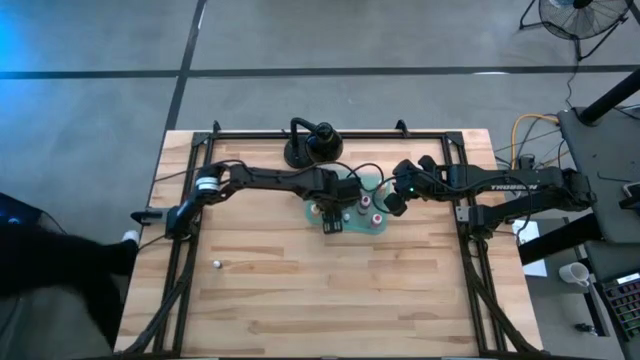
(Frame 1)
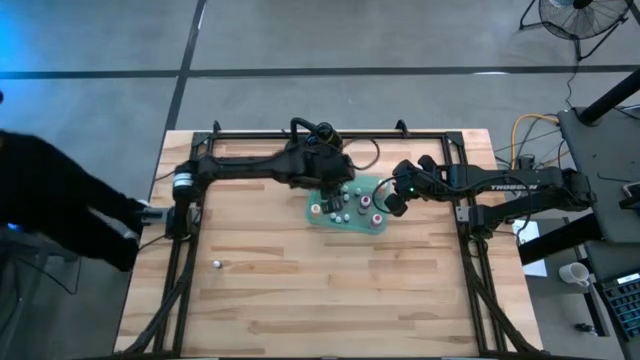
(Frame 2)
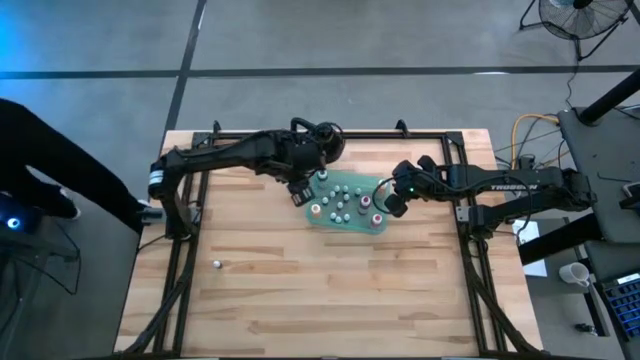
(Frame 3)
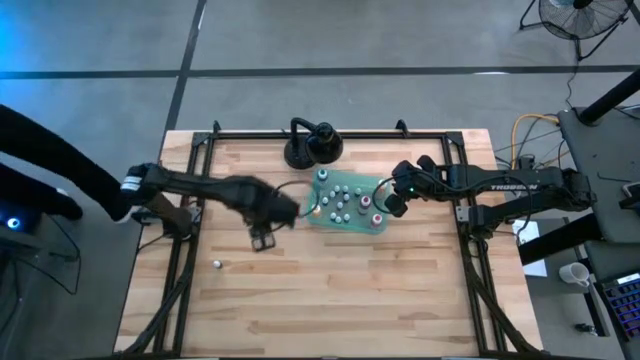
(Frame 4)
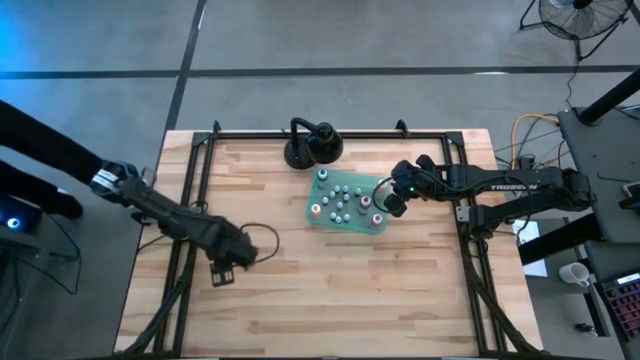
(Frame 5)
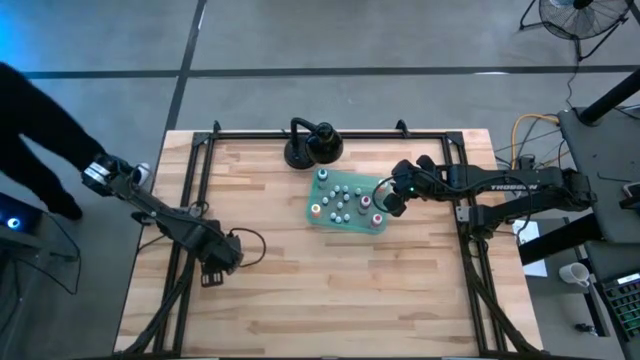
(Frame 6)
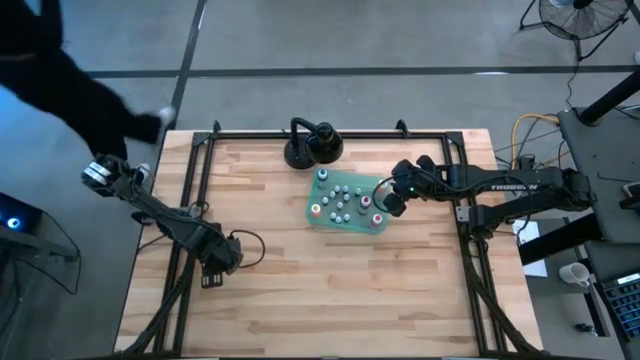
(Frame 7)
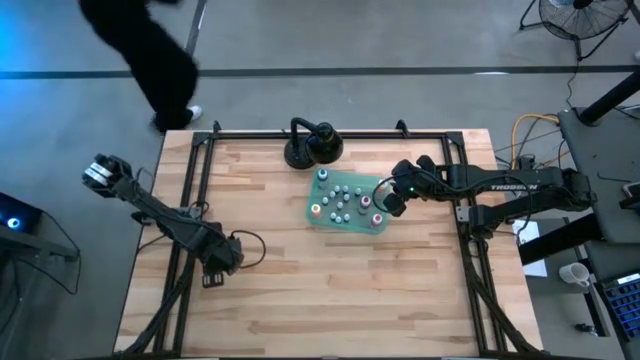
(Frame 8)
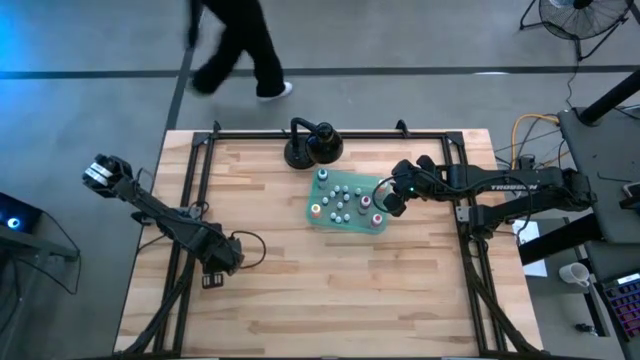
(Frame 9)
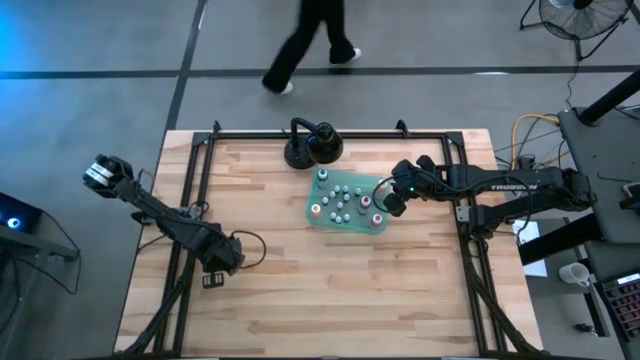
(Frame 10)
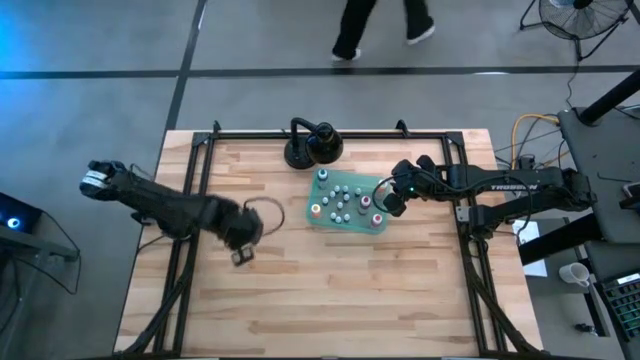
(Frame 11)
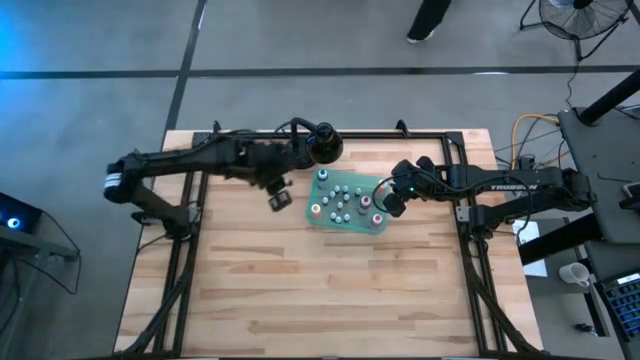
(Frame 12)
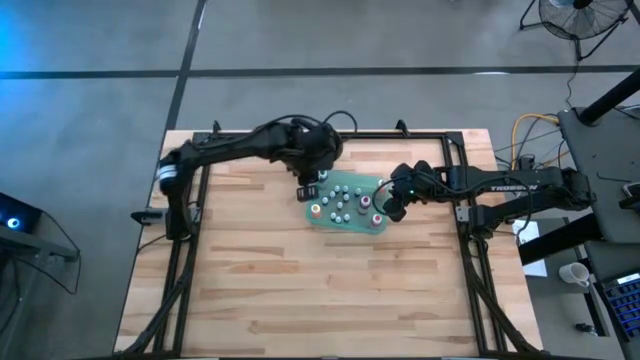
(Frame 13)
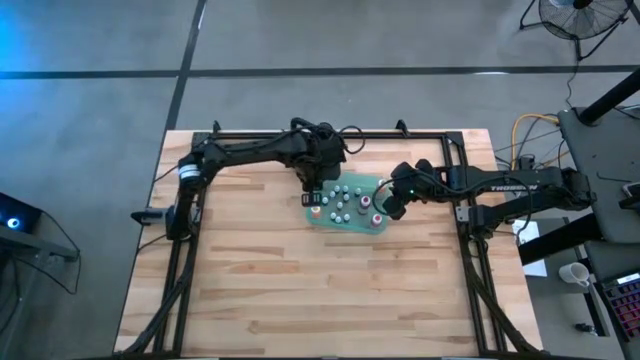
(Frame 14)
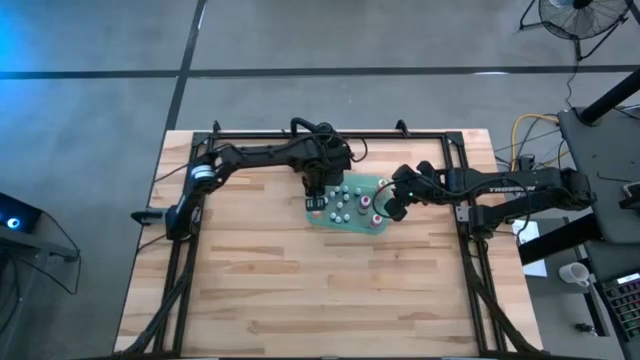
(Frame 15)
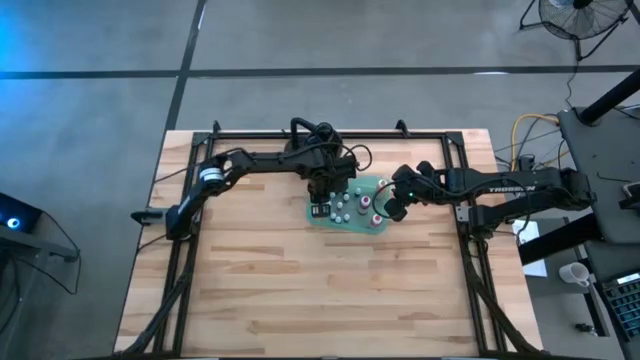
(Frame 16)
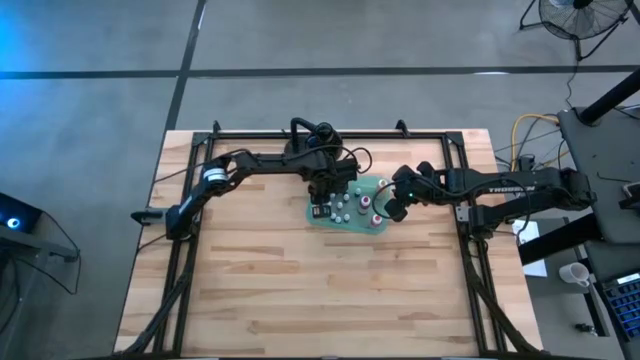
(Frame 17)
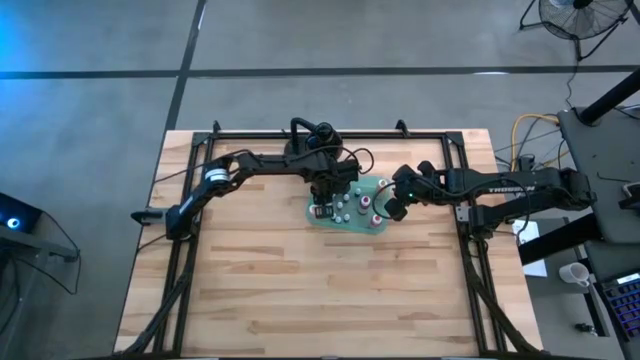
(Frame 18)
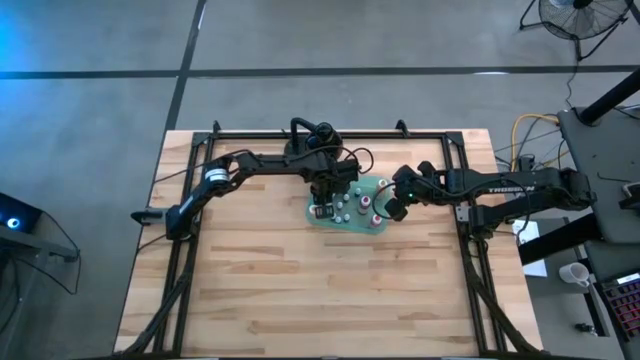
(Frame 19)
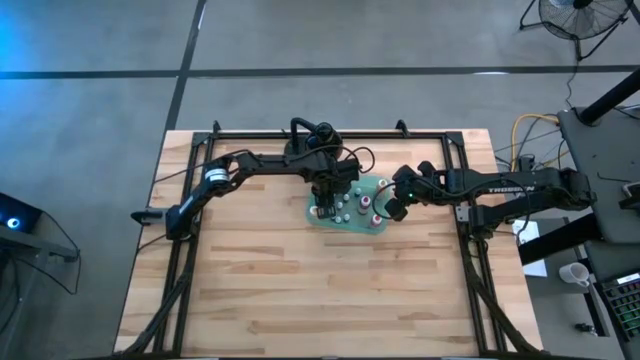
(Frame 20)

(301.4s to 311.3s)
Task: Pick & Place food coloring
Put the green food coloring bottle into the bin

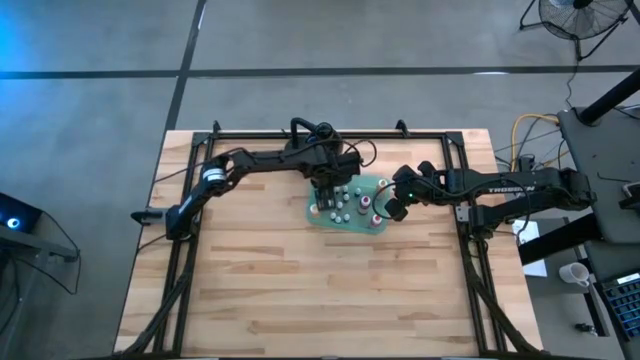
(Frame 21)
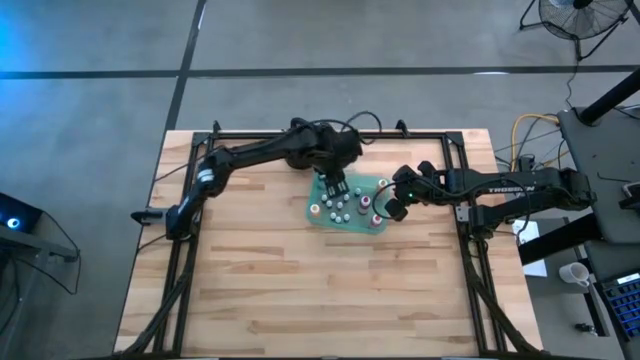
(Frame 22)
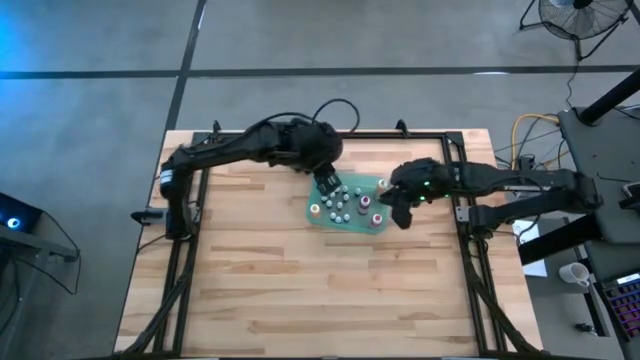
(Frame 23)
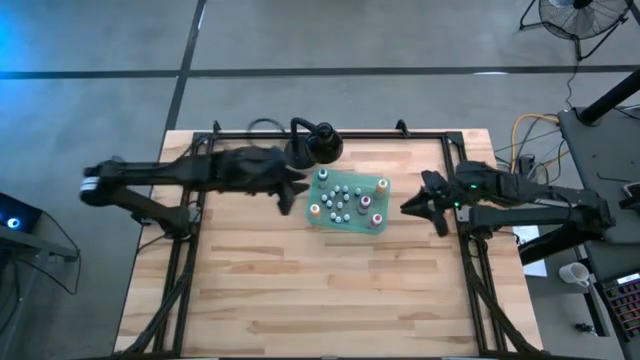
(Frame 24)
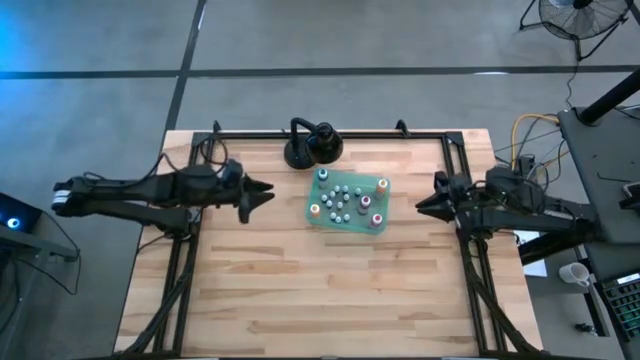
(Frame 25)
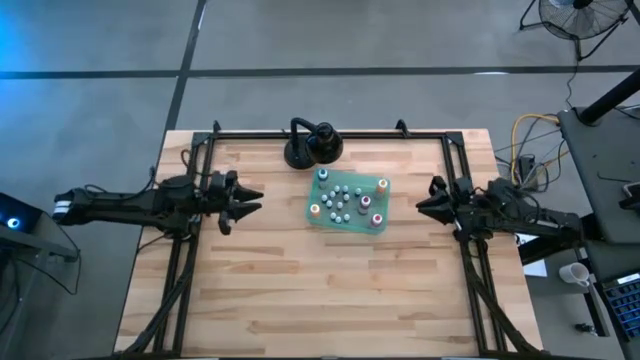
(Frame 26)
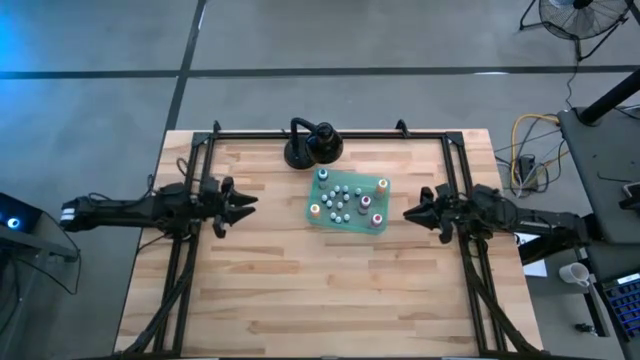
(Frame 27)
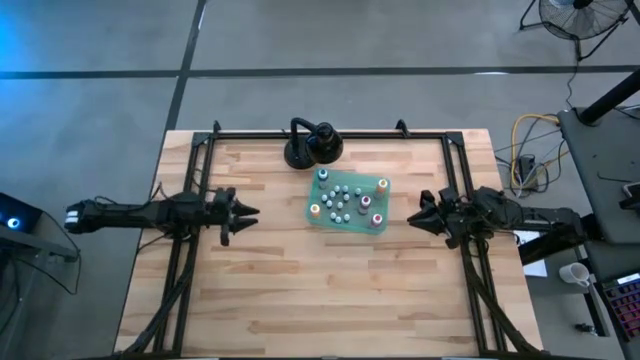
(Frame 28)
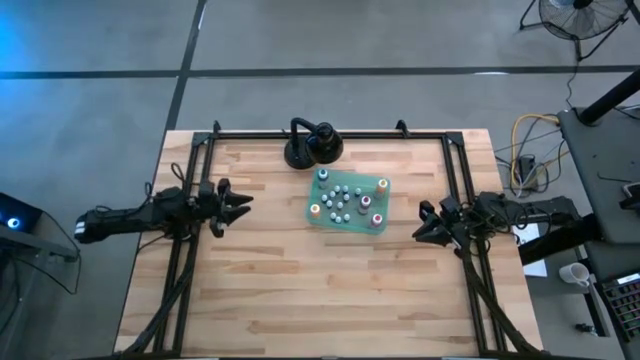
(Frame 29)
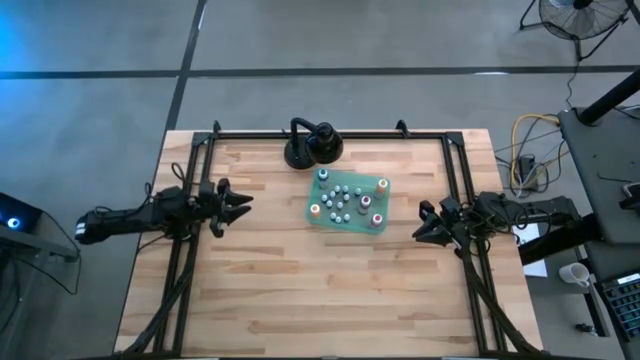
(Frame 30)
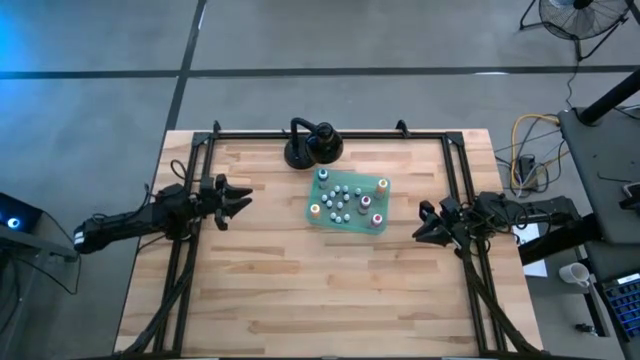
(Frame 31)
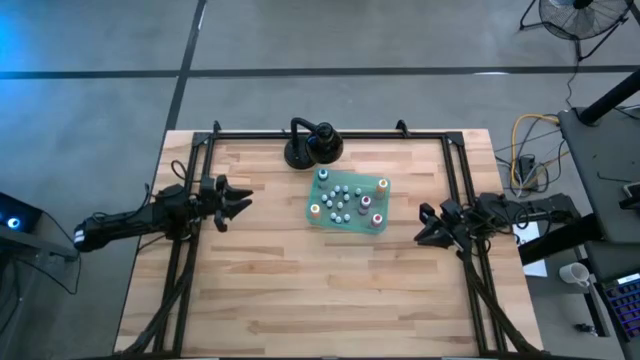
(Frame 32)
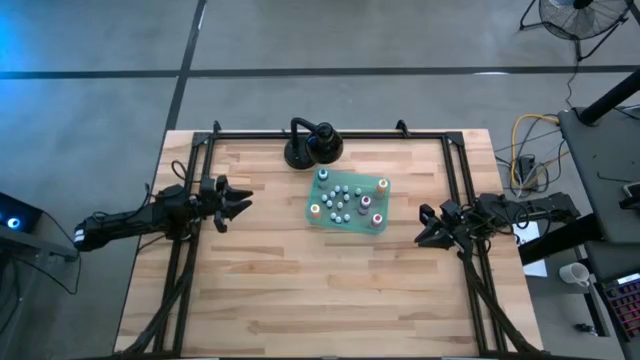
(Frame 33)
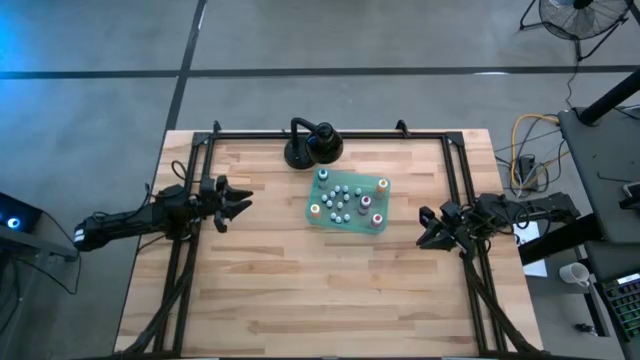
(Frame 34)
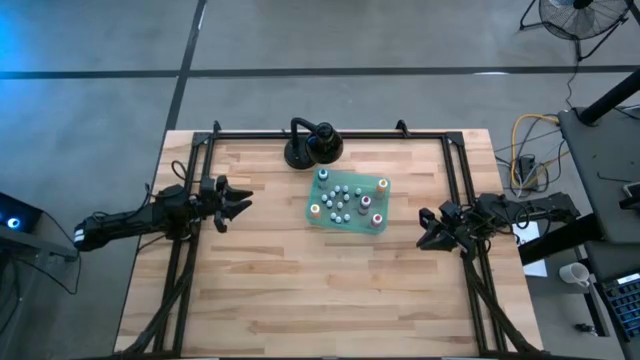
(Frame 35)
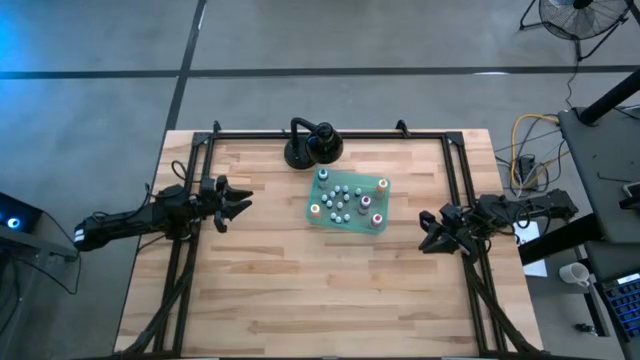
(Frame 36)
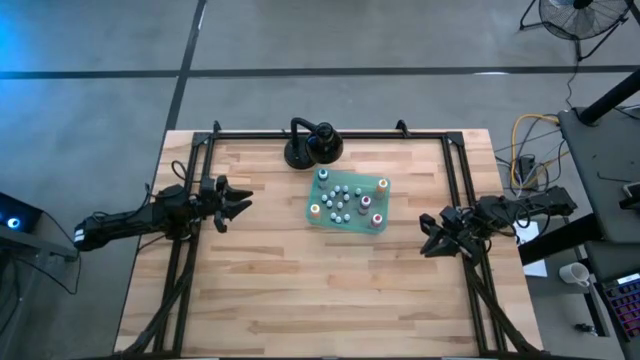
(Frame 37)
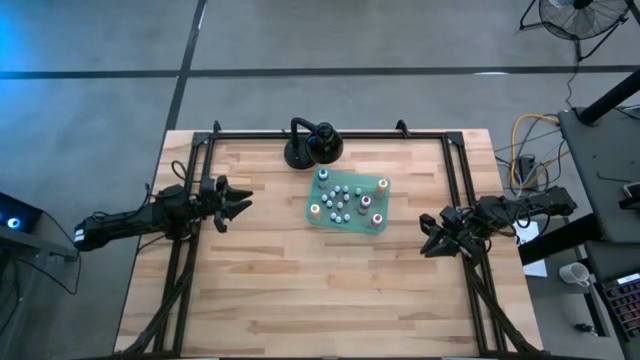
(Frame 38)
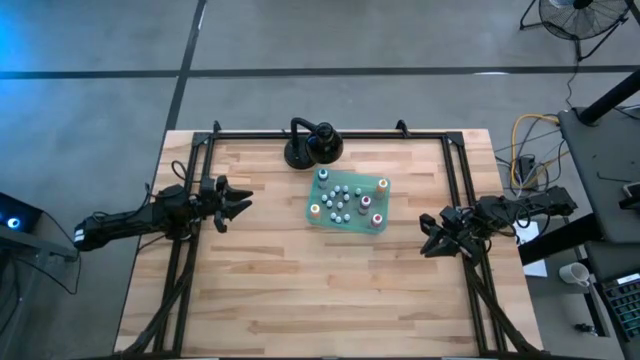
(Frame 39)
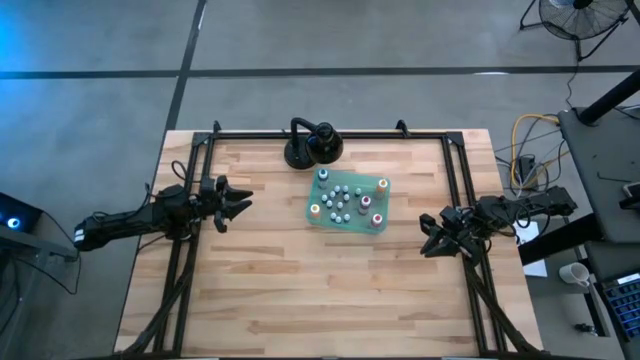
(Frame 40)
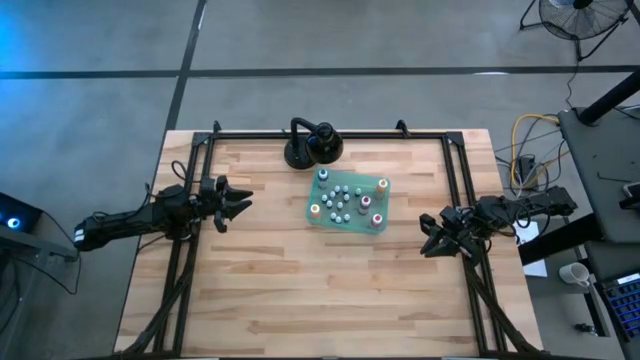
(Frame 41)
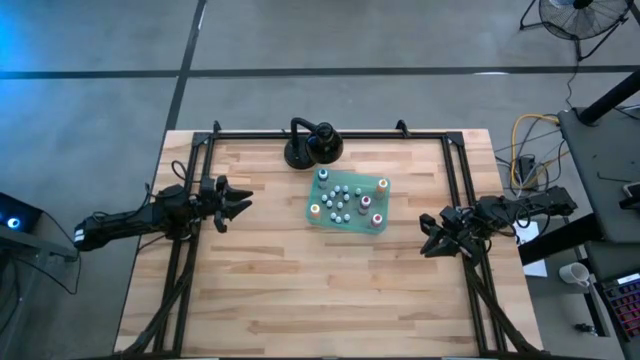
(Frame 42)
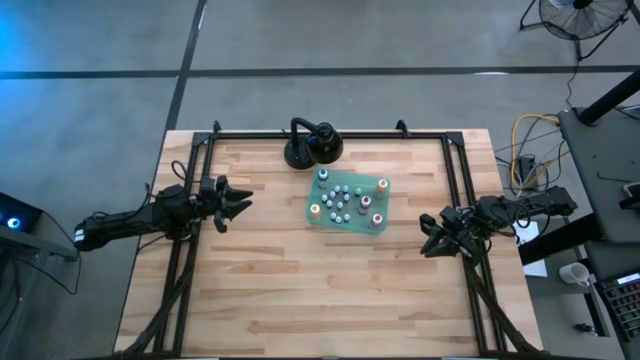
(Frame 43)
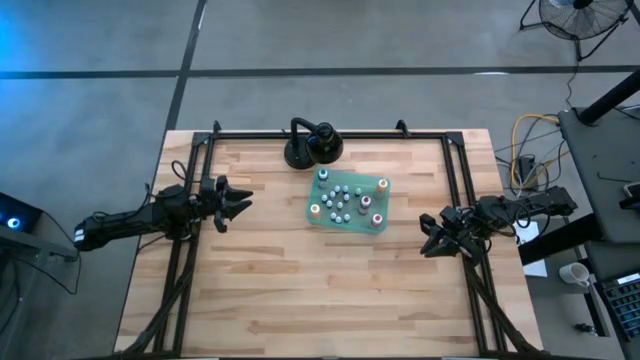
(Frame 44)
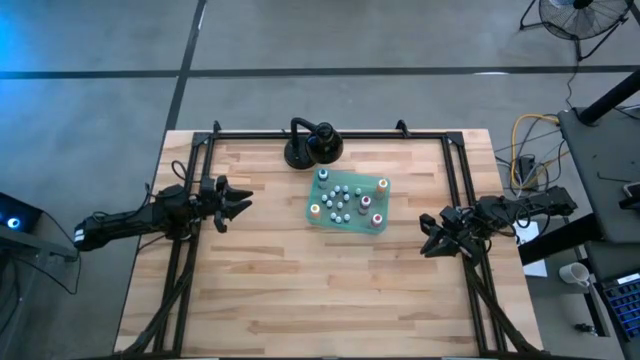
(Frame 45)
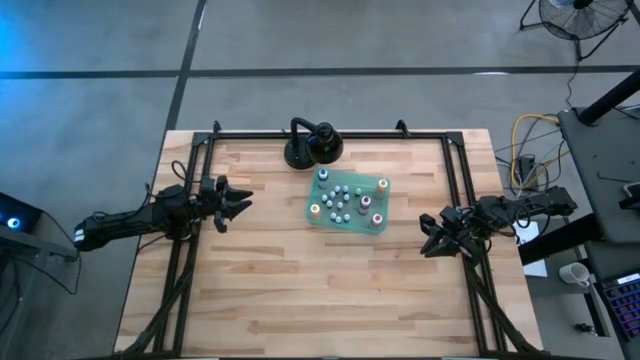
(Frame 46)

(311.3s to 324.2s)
Return to Home Position
